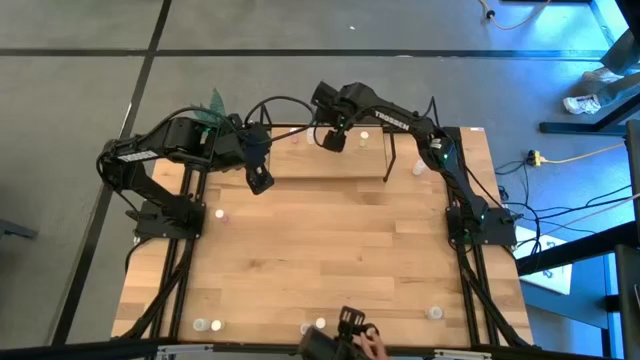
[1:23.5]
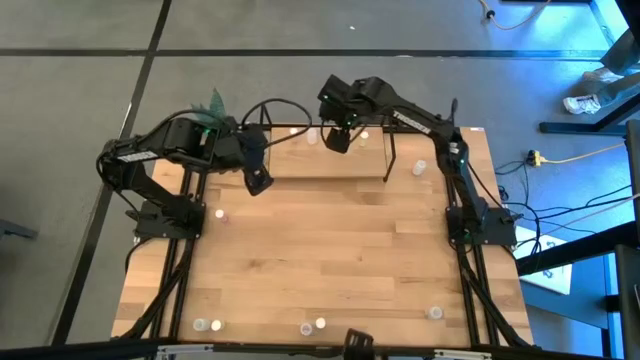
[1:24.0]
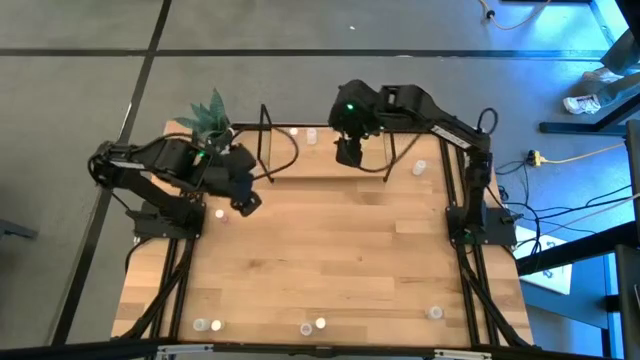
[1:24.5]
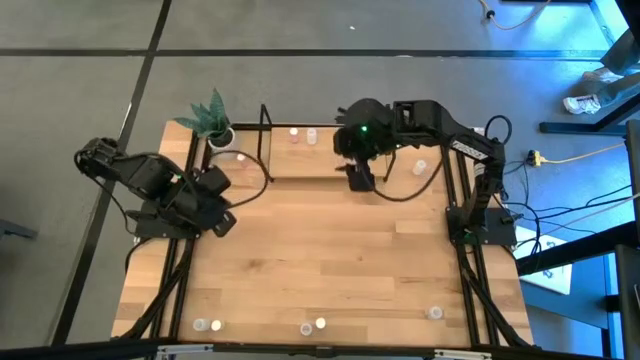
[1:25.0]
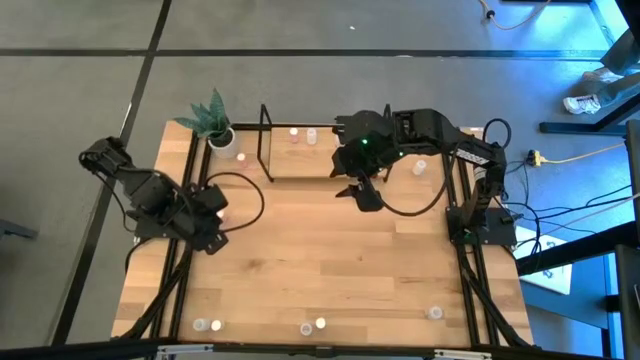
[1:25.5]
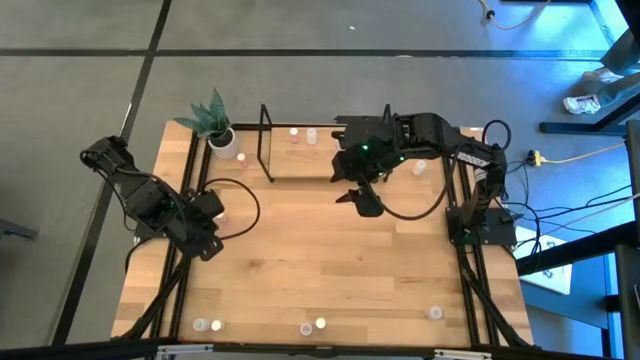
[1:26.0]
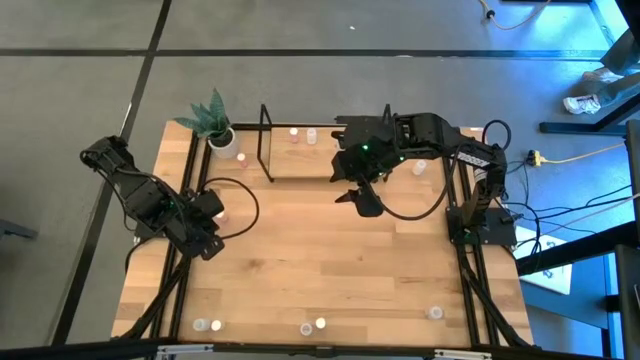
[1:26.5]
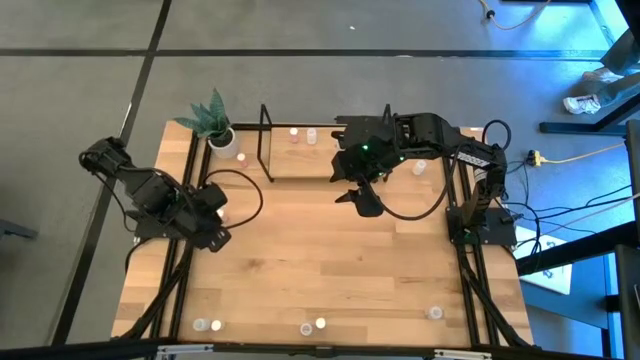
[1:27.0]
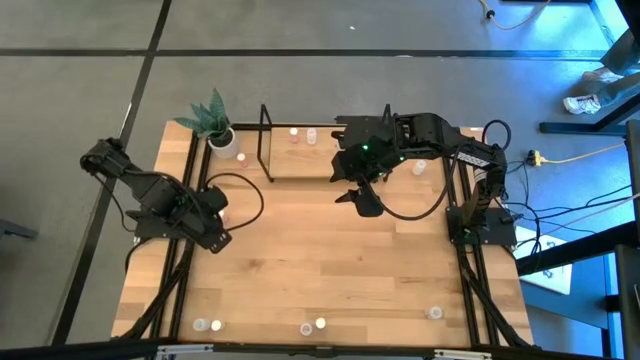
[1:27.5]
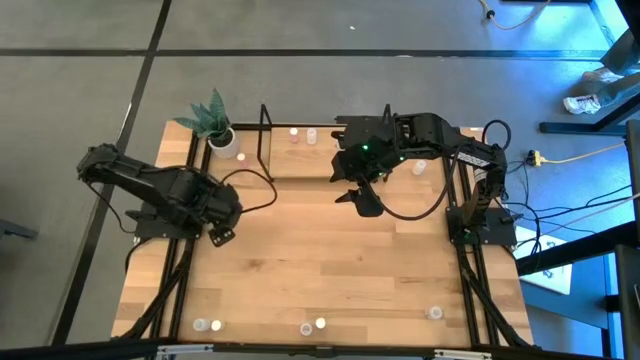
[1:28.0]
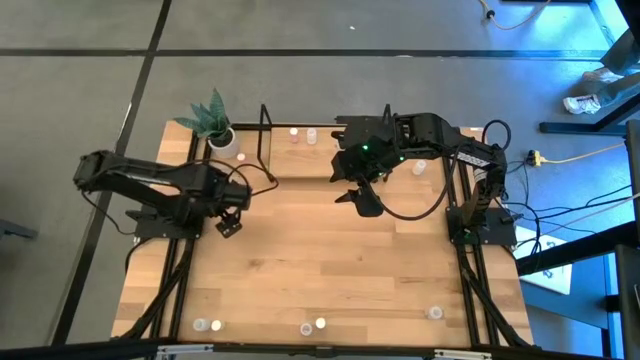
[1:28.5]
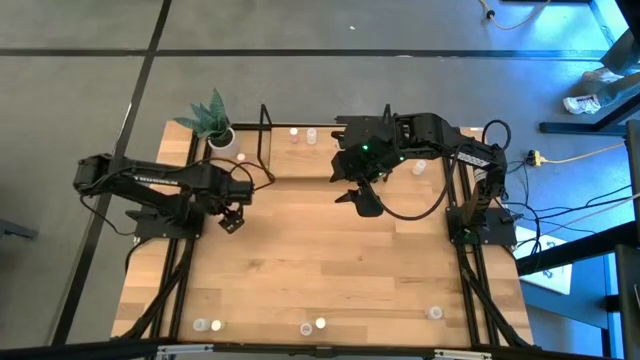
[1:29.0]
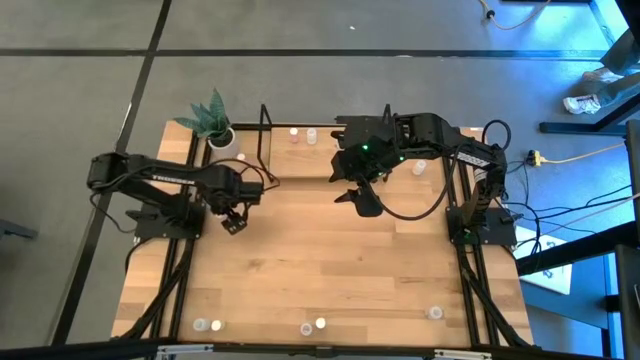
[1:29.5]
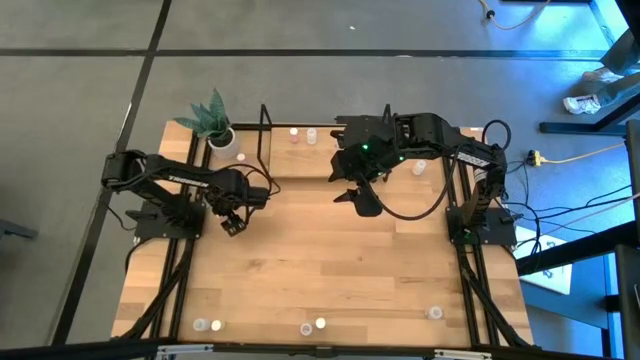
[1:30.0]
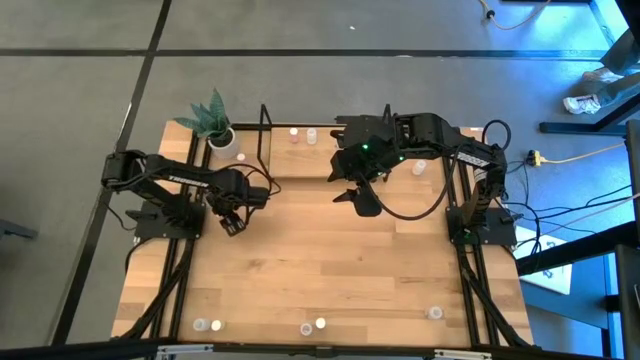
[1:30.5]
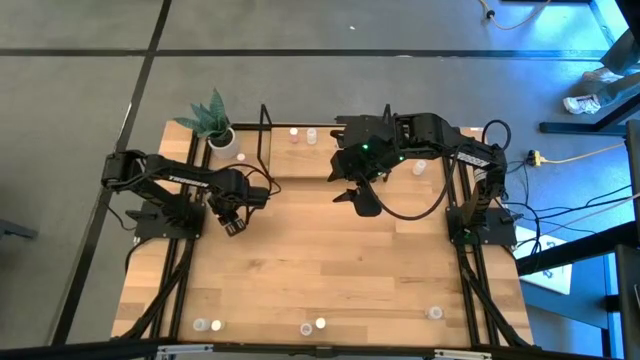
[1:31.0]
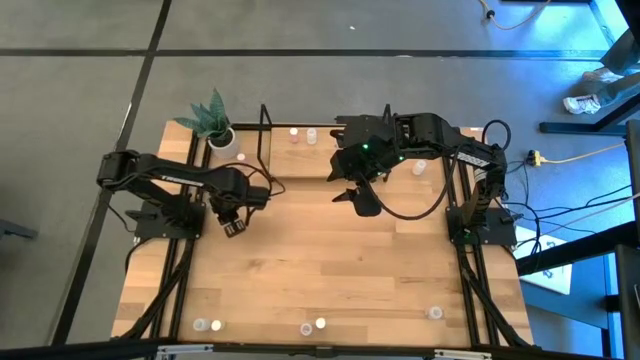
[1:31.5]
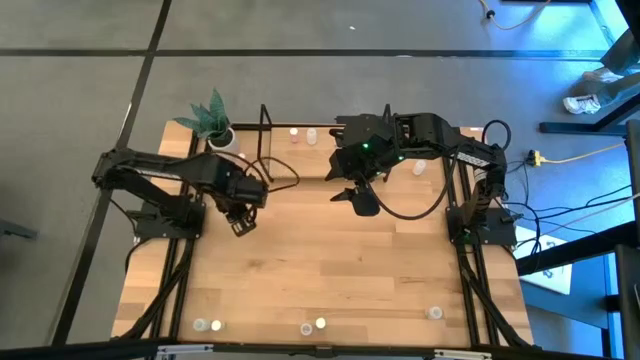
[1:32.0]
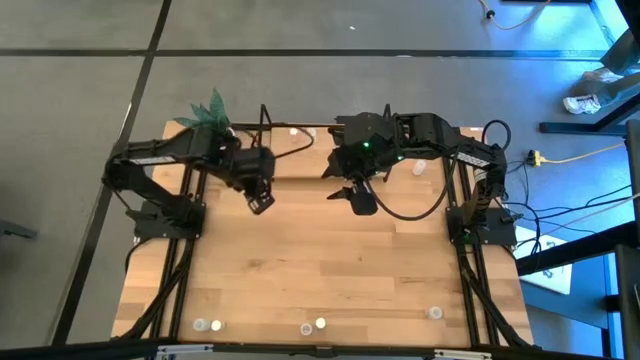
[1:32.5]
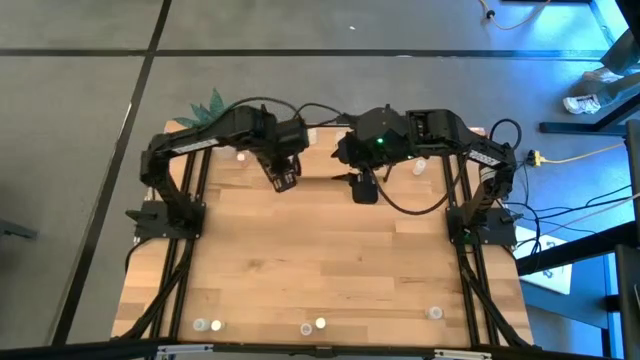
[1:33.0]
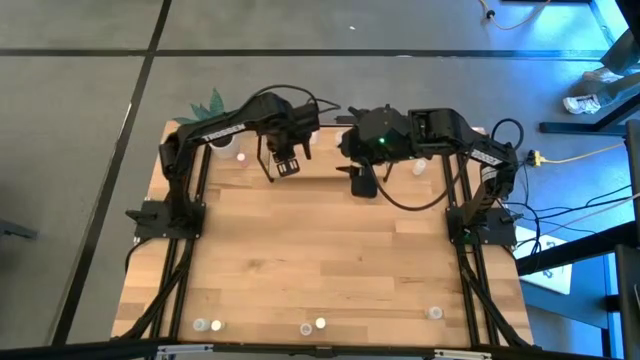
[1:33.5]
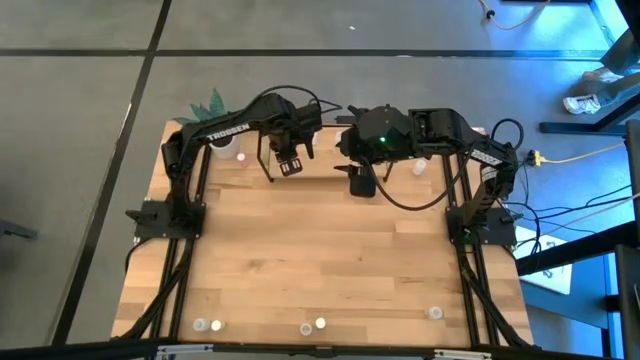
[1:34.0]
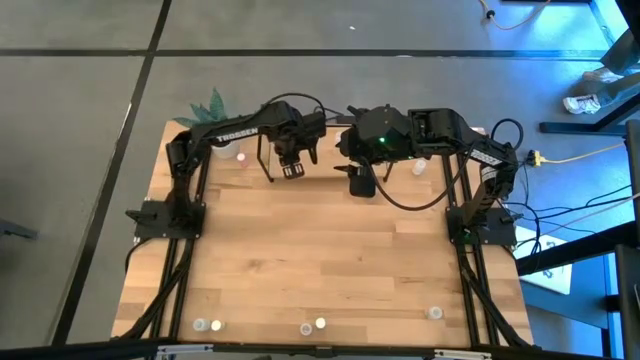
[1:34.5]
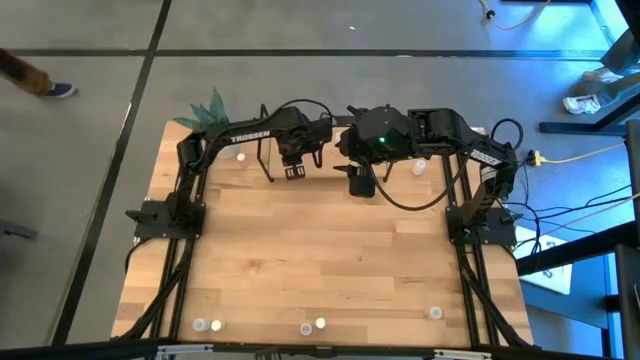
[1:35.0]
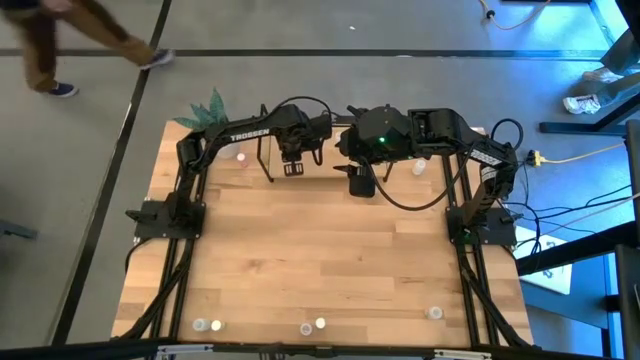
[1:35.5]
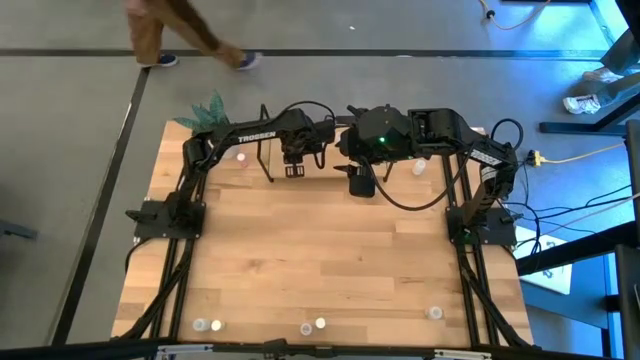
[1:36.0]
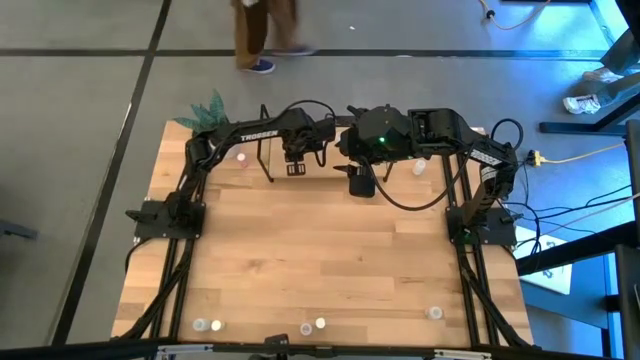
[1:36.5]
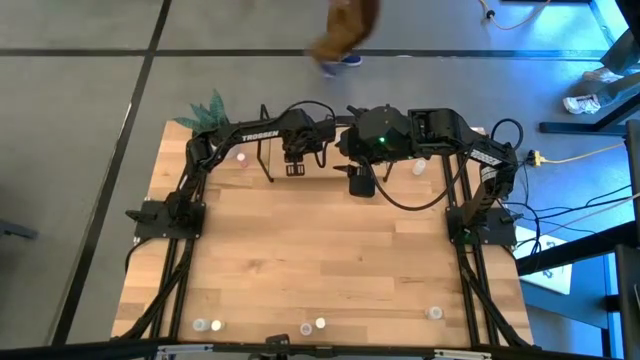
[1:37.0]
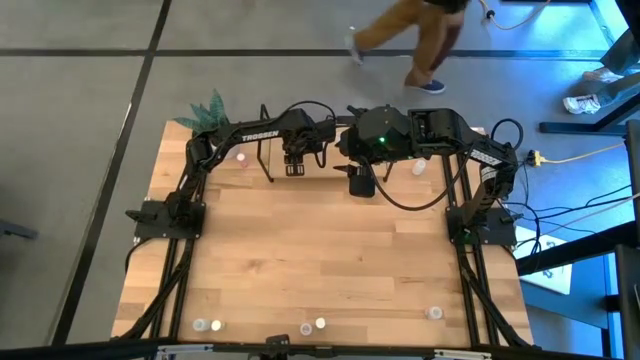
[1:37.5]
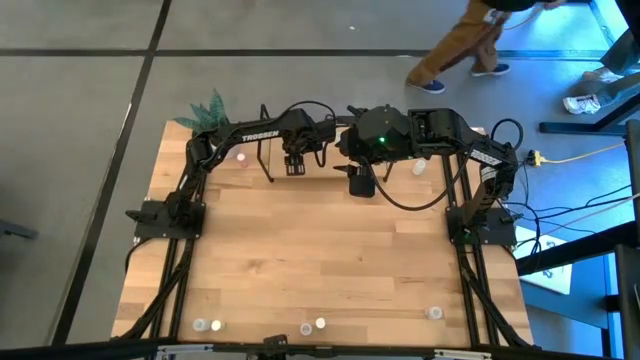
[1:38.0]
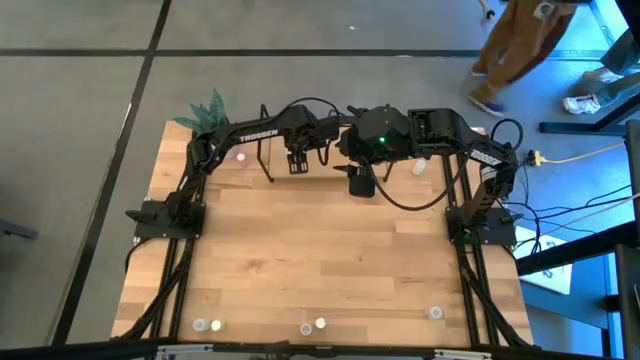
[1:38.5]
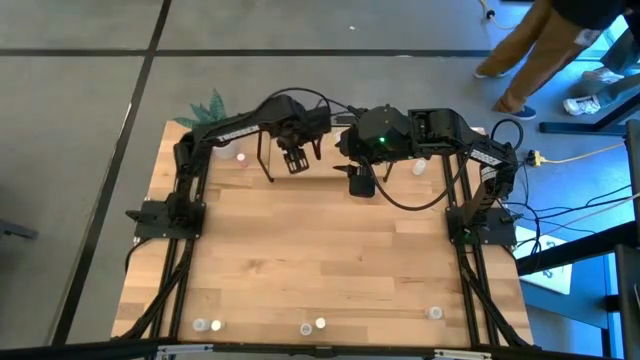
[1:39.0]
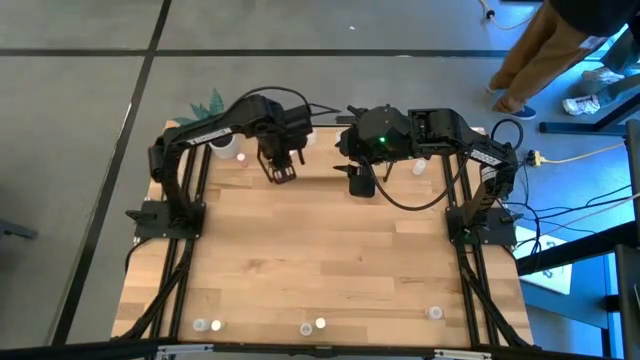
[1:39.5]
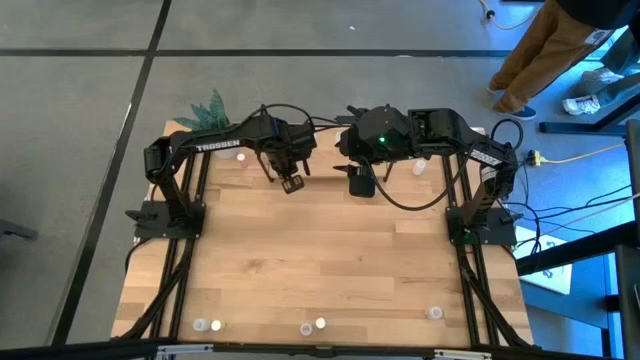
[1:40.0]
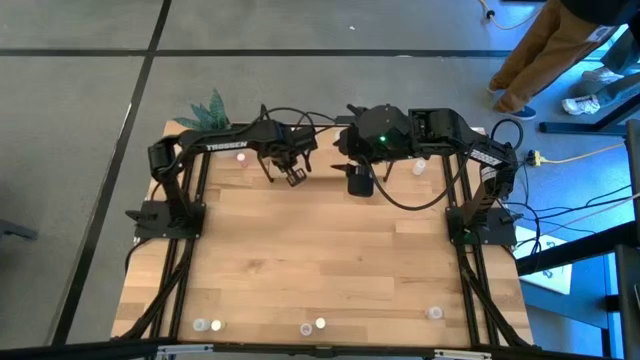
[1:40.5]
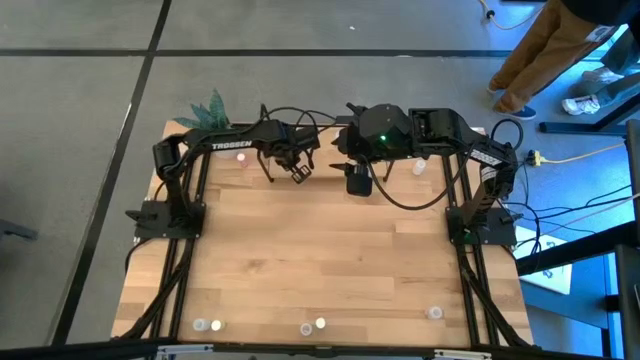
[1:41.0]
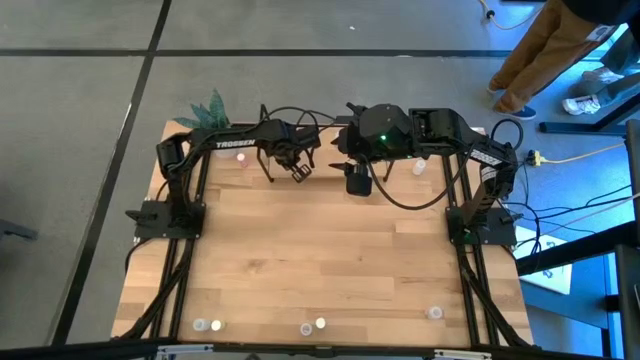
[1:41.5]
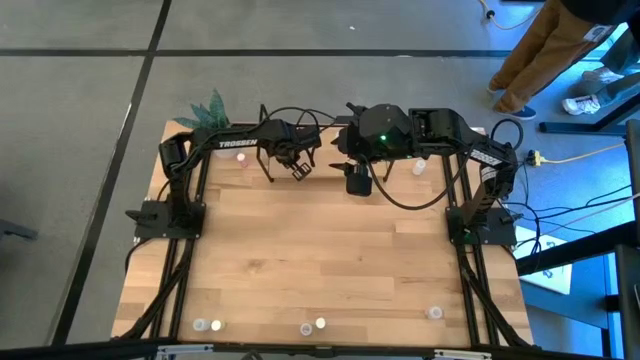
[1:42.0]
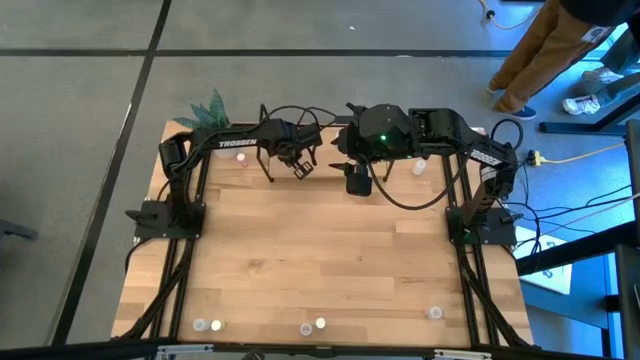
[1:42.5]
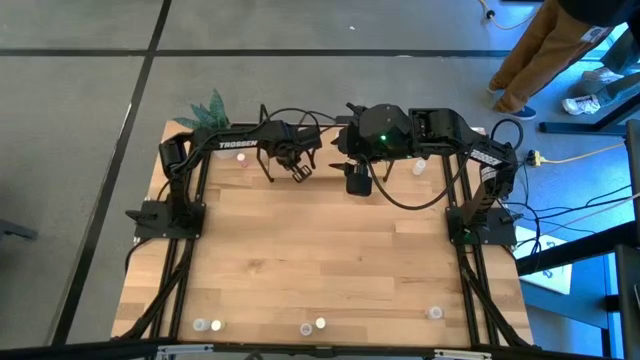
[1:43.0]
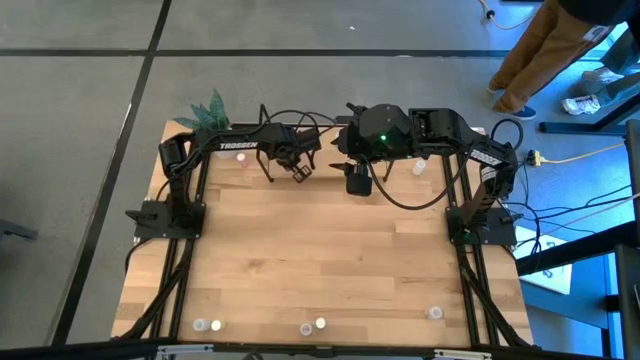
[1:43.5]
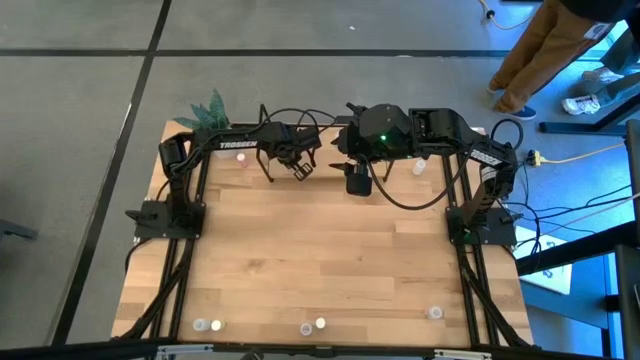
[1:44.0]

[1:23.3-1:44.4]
Task: Pick and place medicine bottles onto shelf by color
Put the bottom pink pill bottle on the shelf aligned with the other pink pill bottle

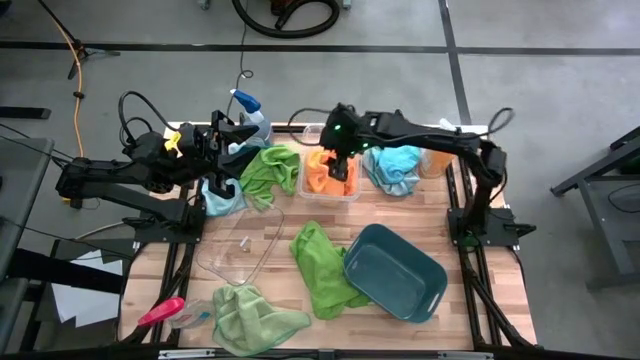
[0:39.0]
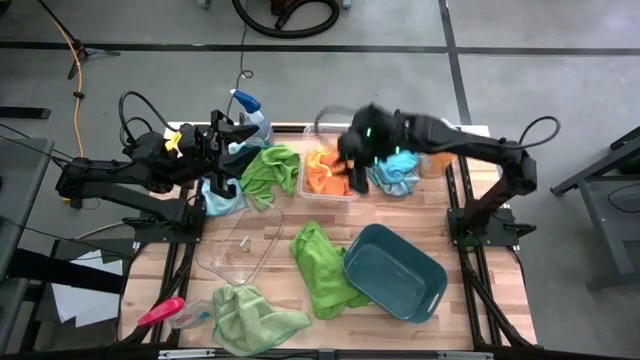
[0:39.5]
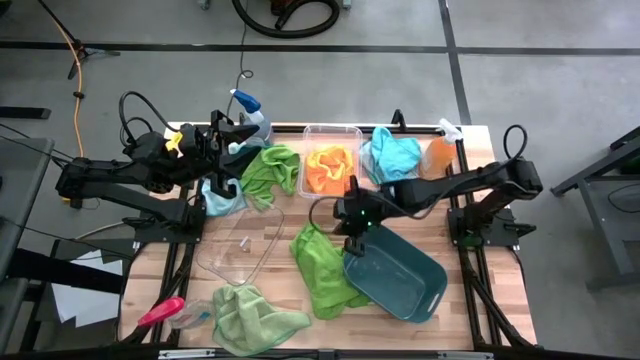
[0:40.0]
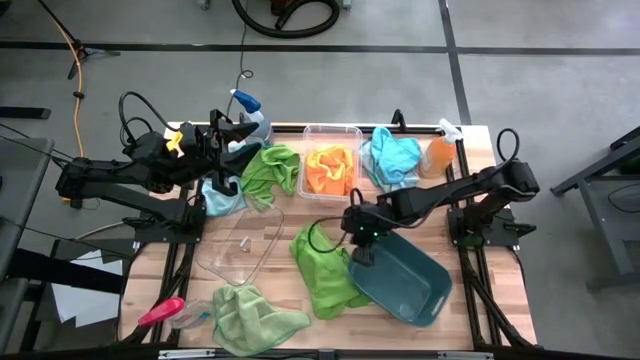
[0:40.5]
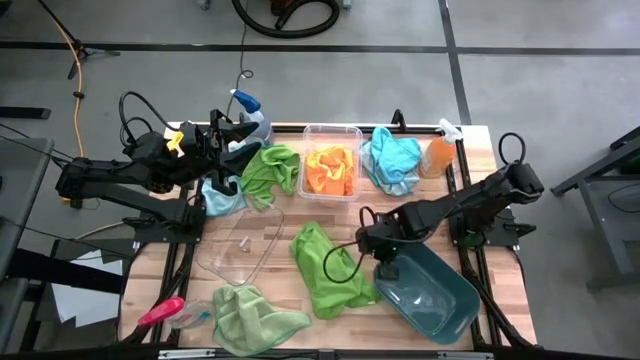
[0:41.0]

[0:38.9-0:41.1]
Task: Sort microfiber towel by color & place in baskets
Adjust the blue bin
